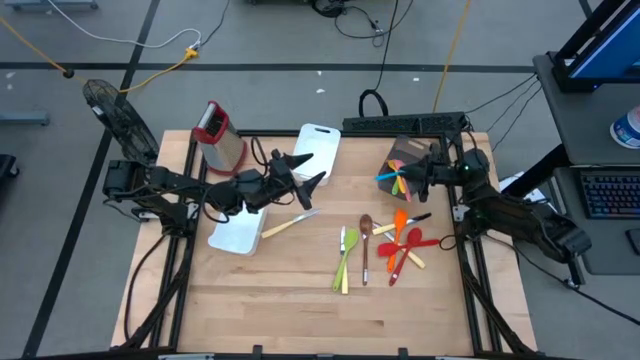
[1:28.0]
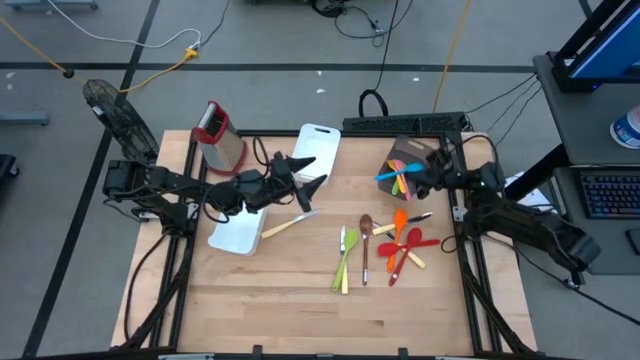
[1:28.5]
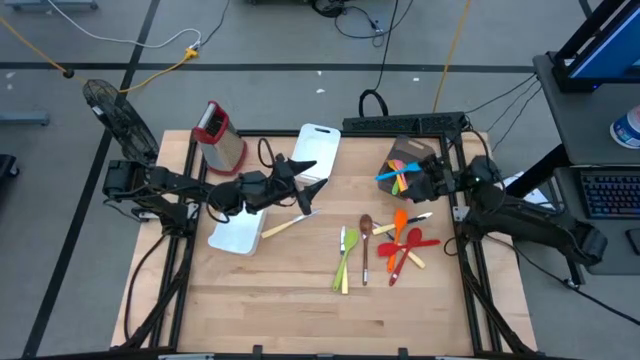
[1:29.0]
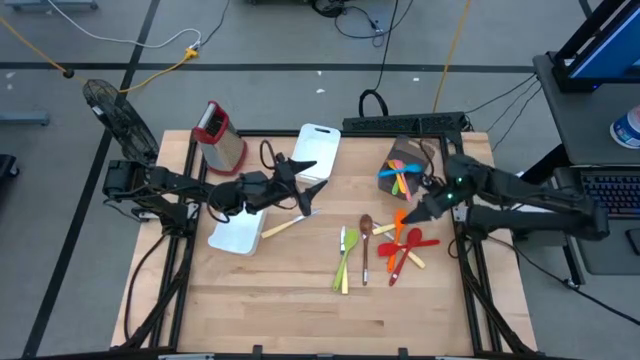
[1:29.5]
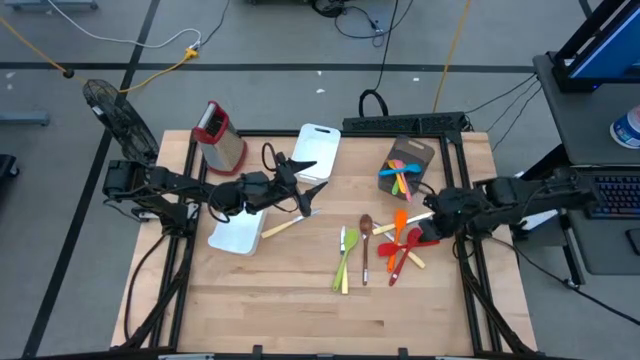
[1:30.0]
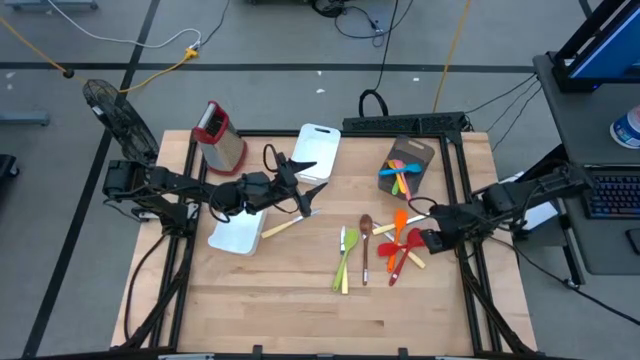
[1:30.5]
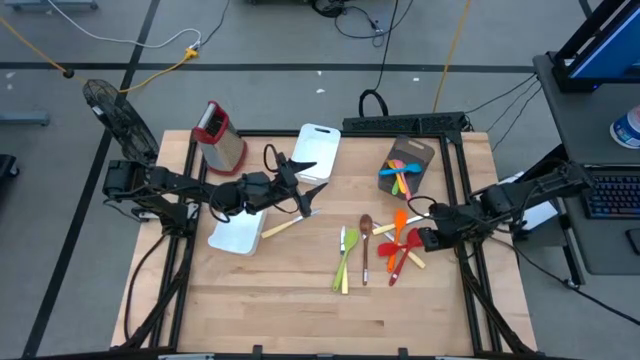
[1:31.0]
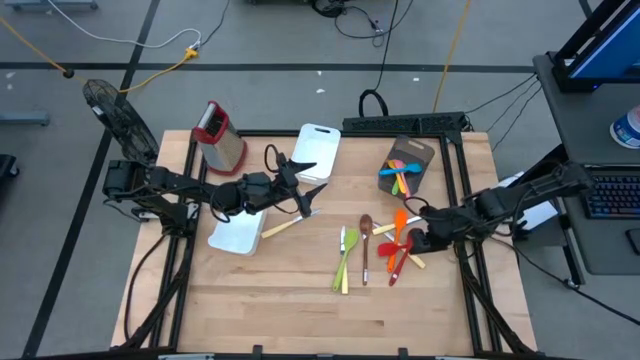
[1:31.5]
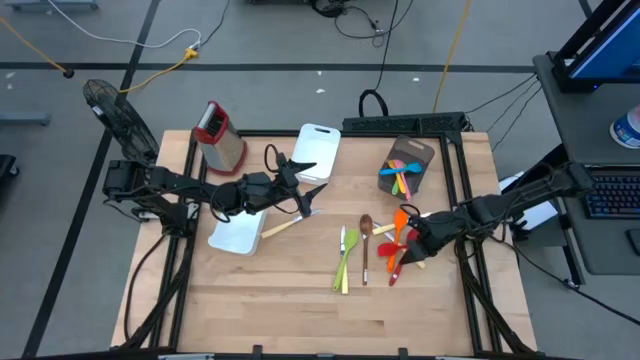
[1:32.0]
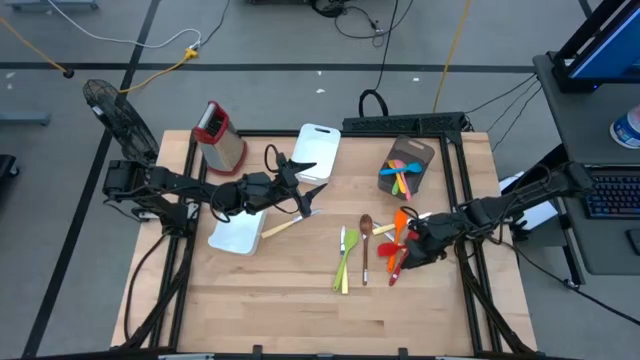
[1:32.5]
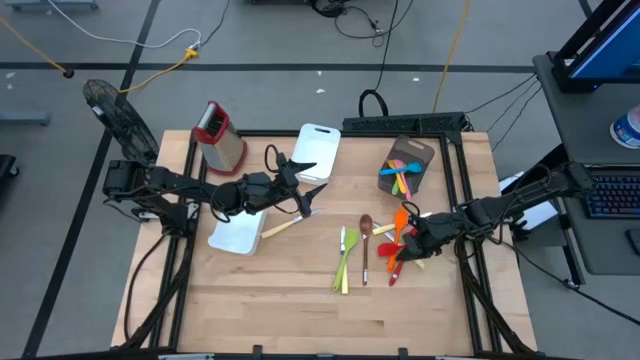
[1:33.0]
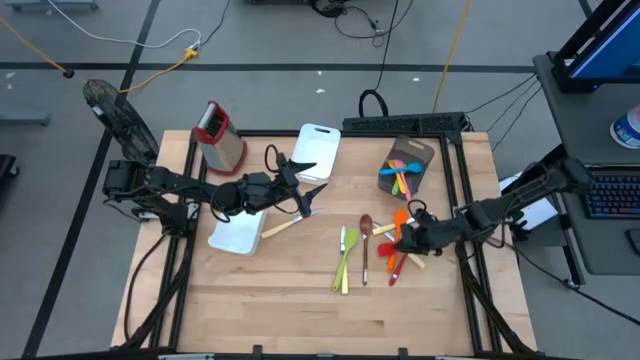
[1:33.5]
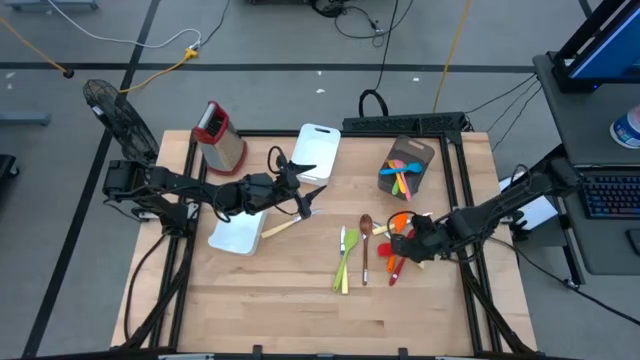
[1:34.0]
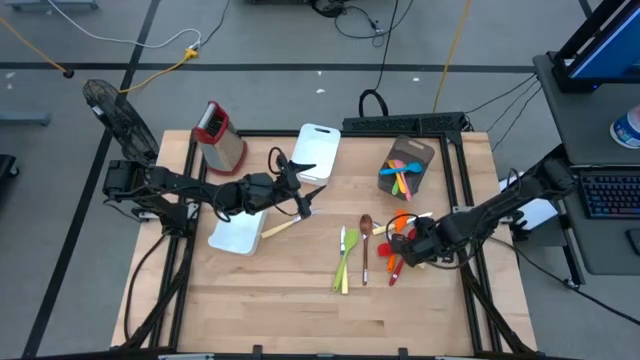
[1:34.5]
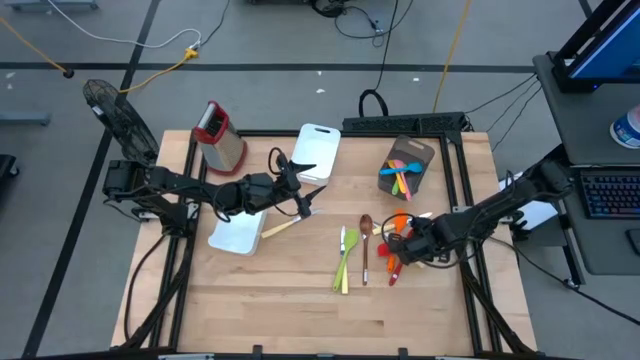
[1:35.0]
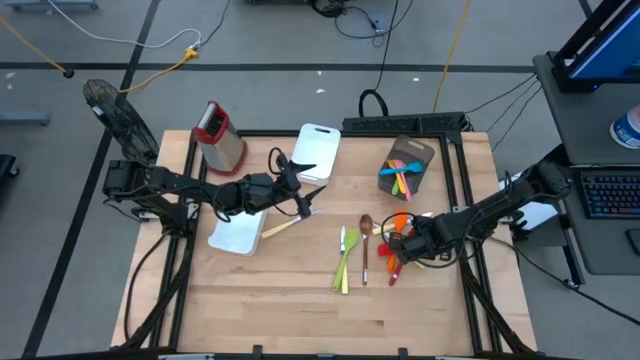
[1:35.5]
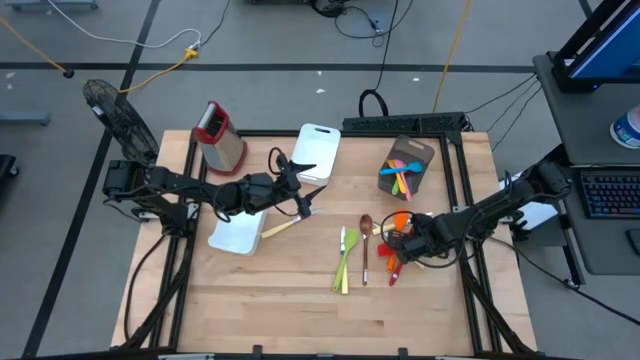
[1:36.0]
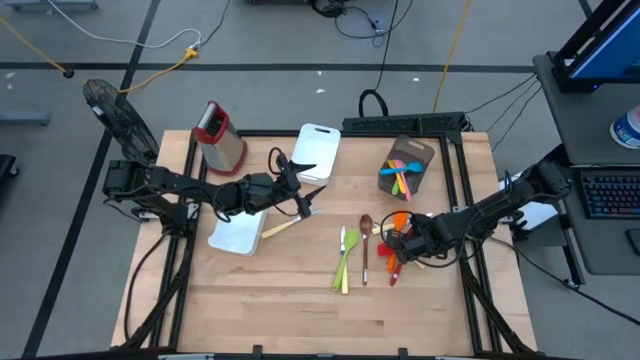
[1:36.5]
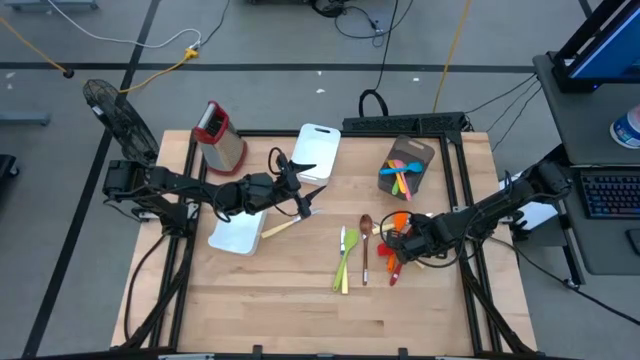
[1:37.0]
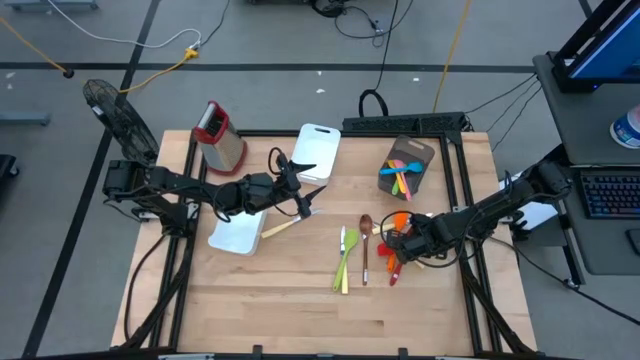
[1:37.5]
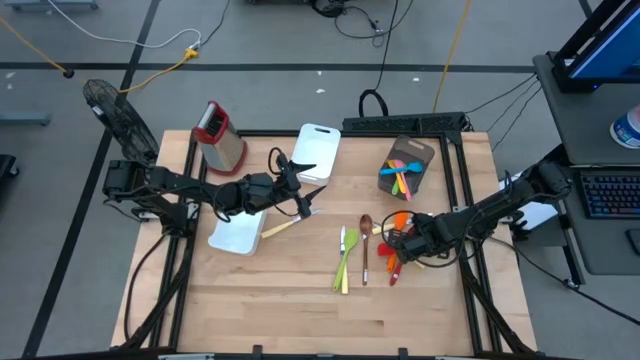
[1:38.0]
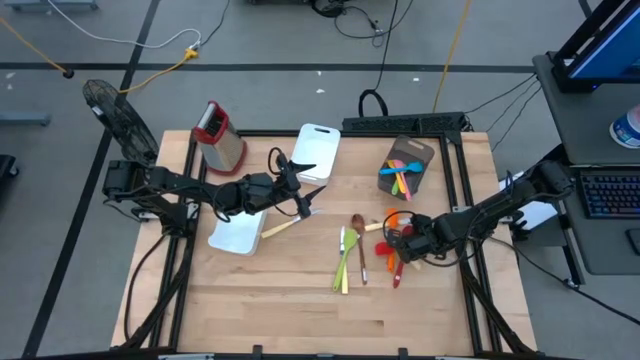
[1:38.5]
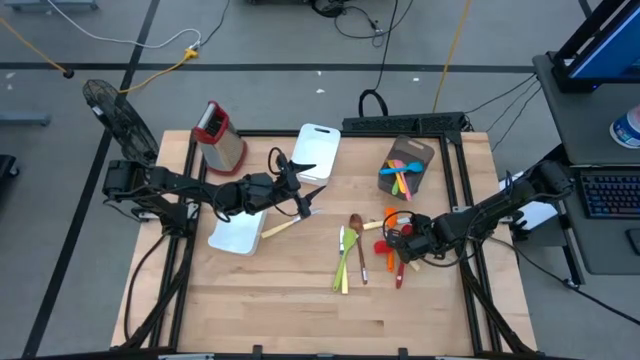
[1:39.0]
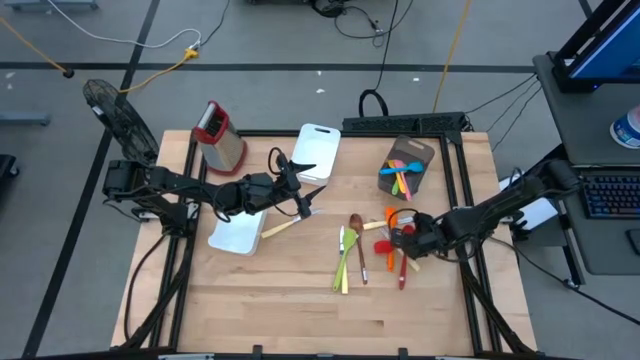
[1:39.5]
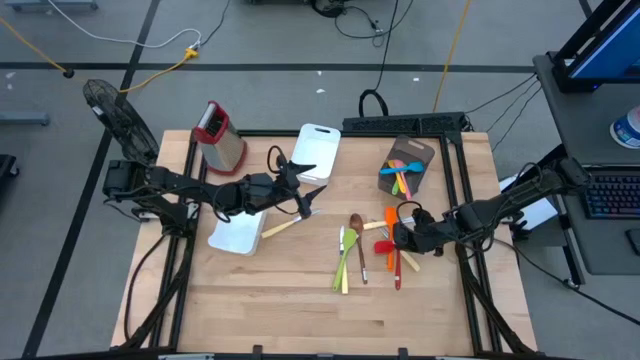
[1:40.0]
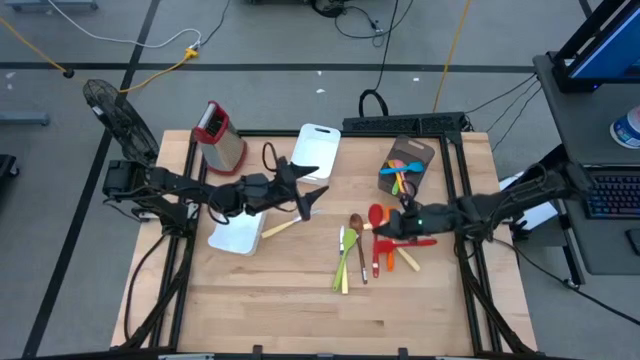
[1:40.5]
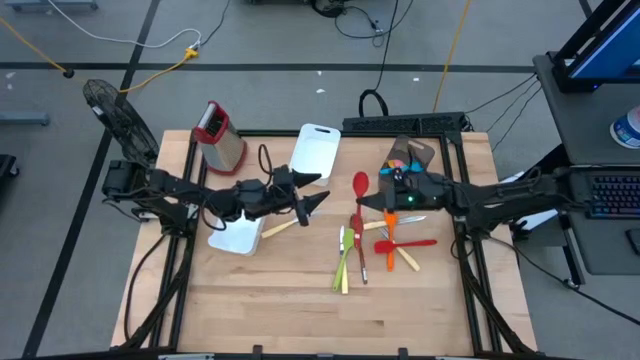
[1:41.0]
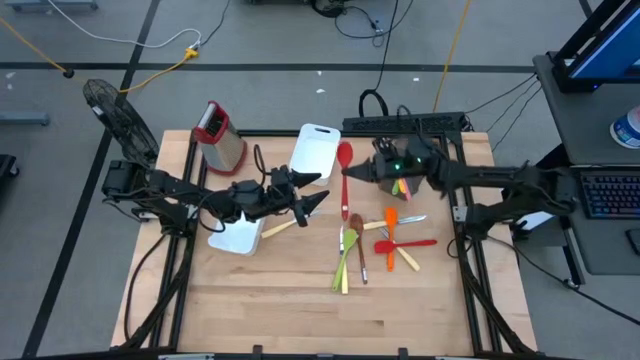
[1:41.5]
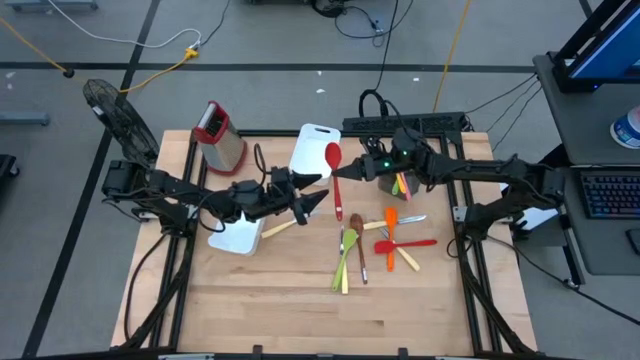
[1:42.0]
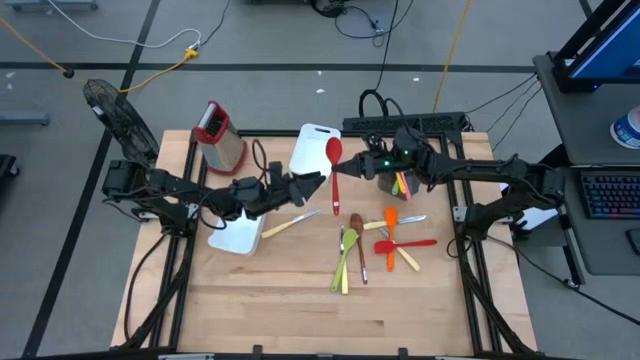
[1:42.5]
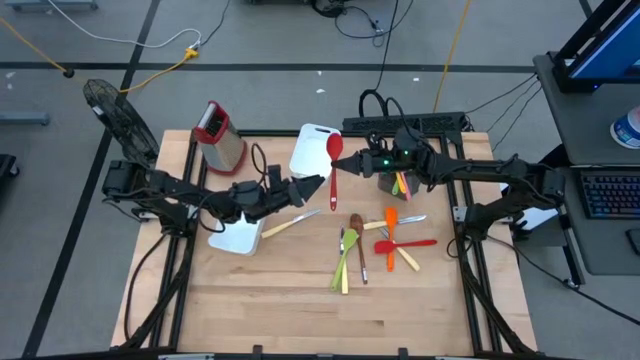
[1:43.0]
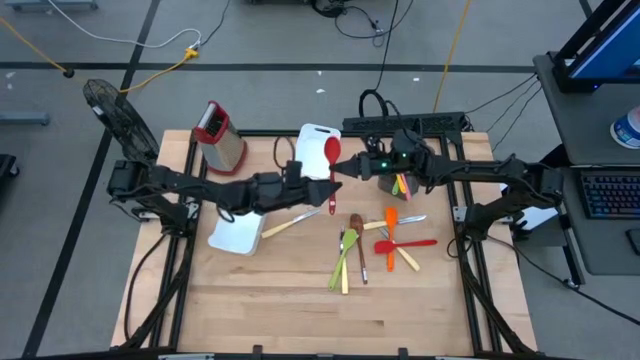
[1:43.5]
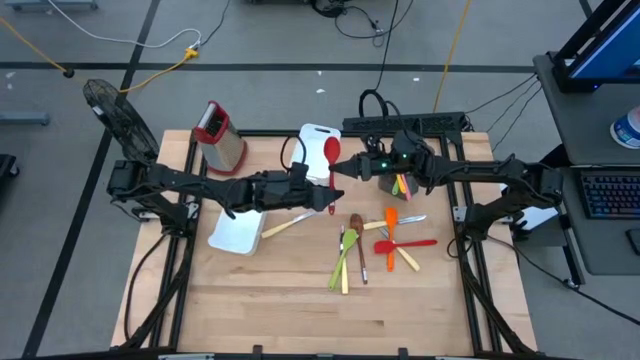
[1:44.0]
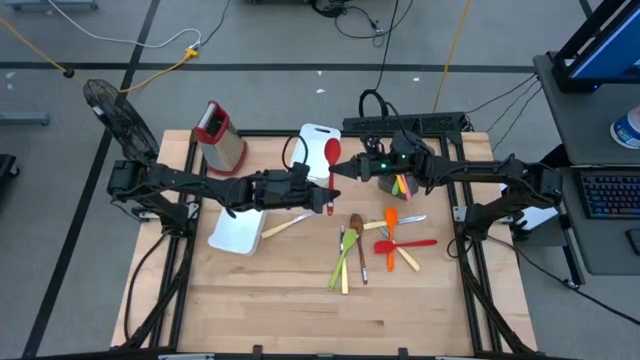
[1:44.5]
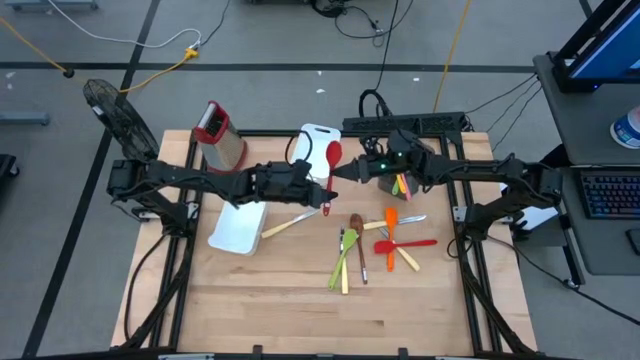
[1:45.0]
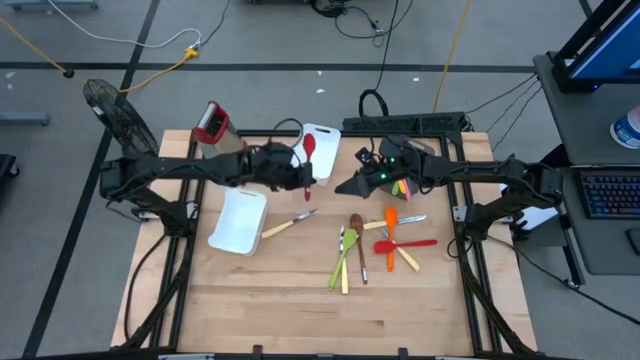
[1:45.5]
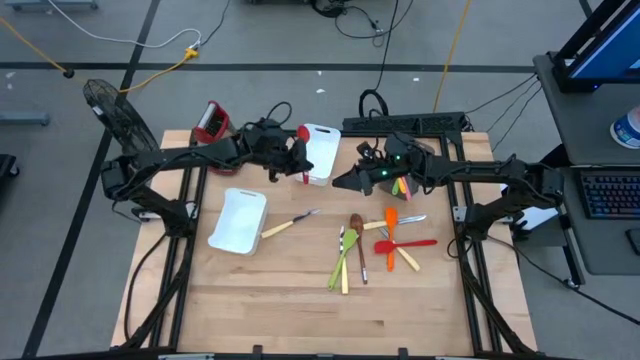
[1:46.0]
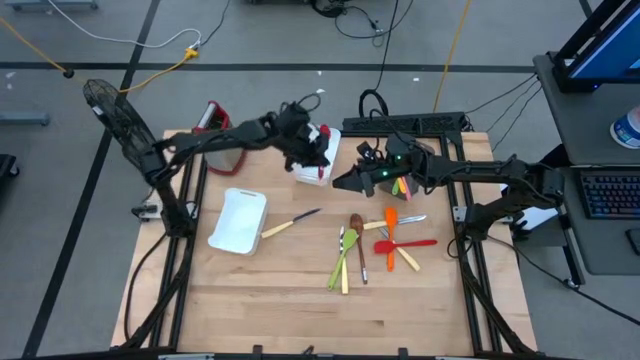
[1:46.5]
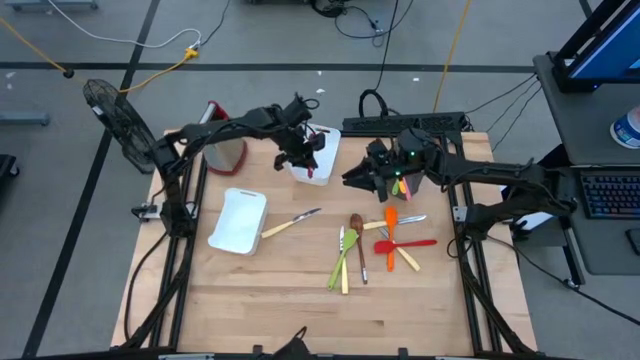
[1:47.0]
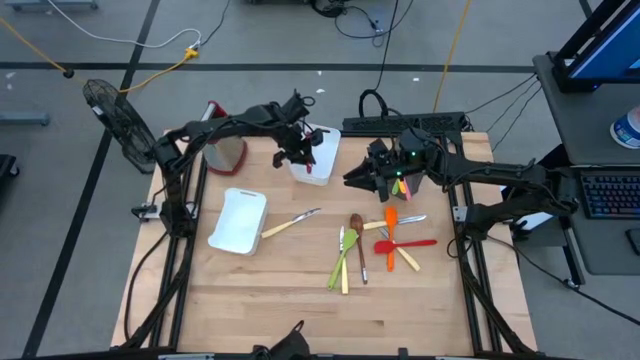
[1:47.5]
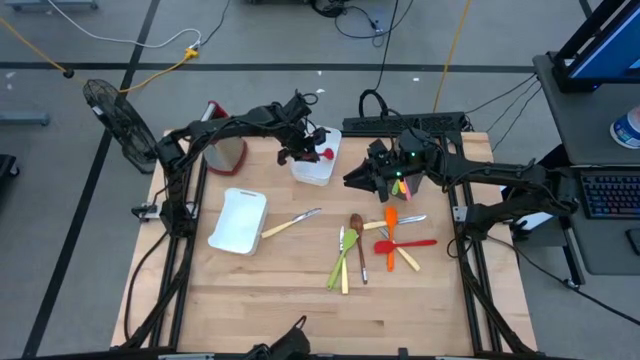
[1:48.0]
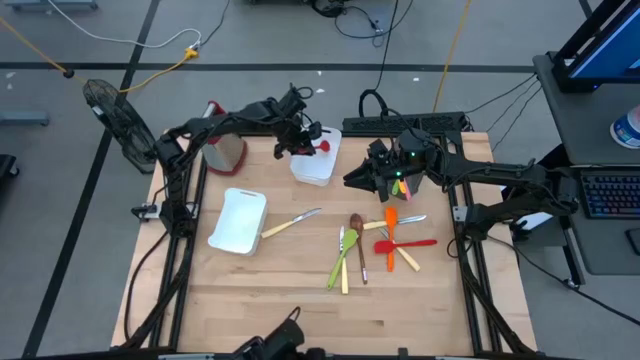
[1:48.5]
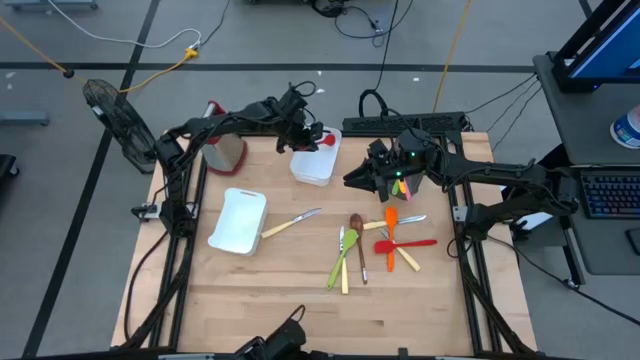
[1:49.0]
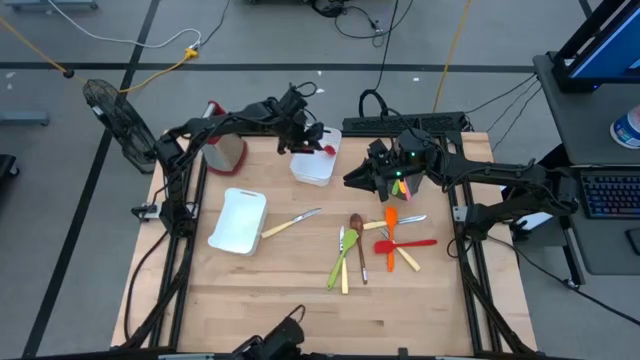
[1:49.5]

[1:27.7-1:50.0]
Task: Pick & Place Kitchen Items
Put the red serving spoon into the top white bin
